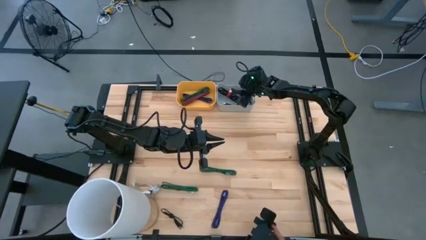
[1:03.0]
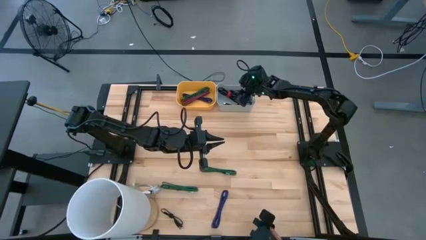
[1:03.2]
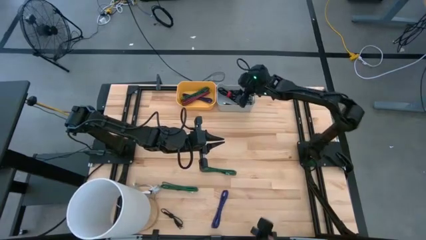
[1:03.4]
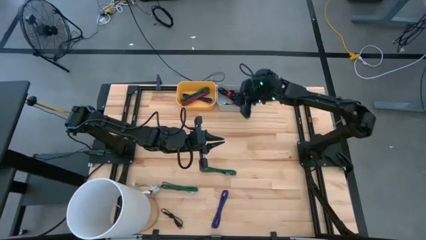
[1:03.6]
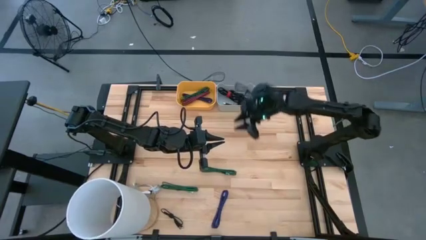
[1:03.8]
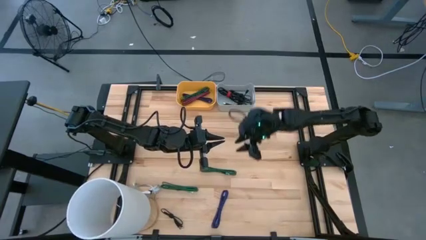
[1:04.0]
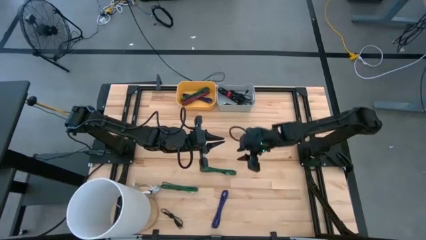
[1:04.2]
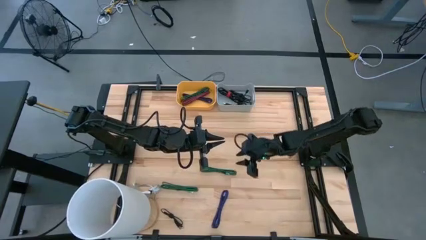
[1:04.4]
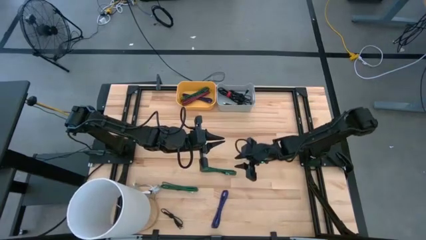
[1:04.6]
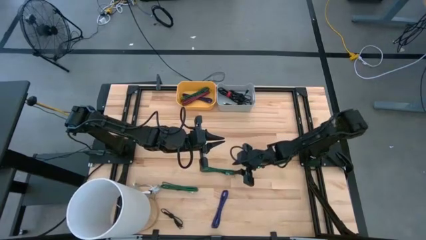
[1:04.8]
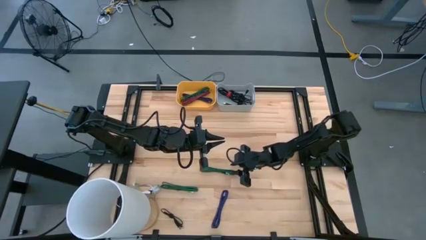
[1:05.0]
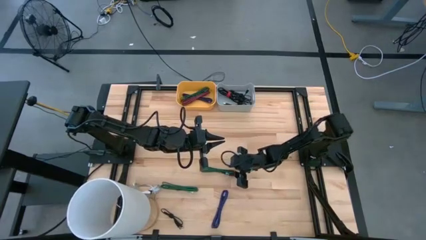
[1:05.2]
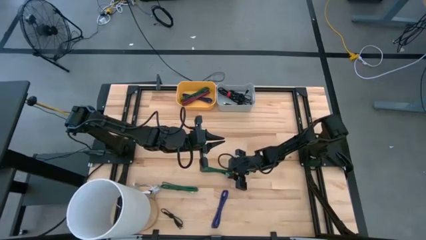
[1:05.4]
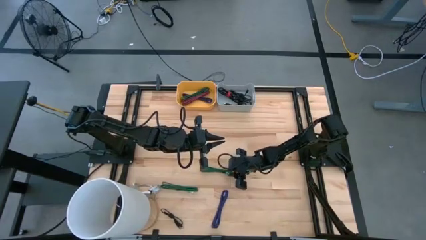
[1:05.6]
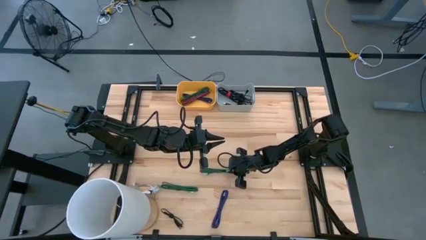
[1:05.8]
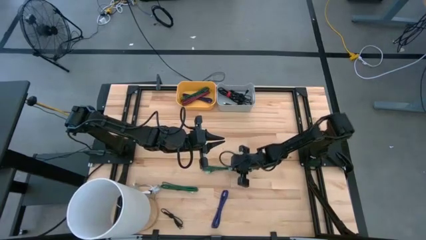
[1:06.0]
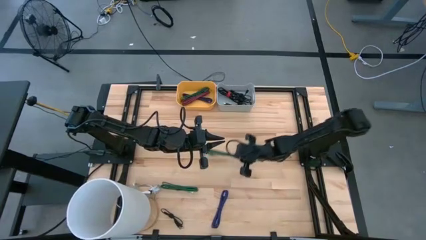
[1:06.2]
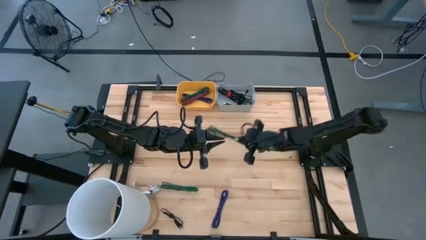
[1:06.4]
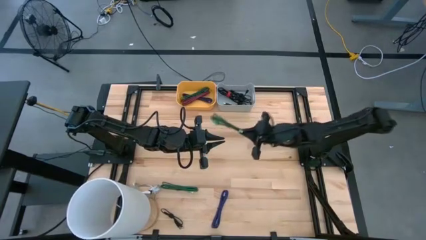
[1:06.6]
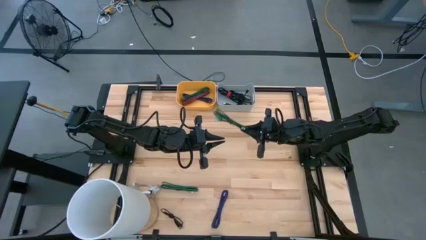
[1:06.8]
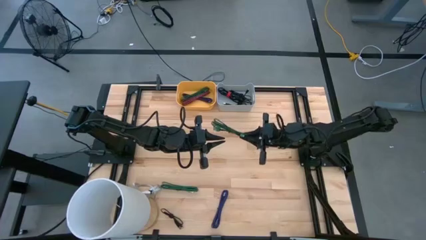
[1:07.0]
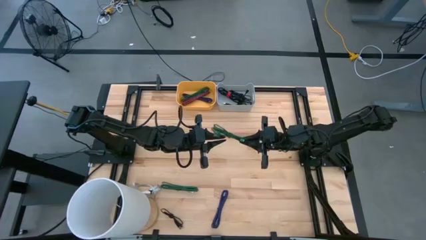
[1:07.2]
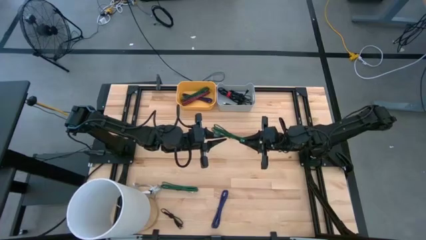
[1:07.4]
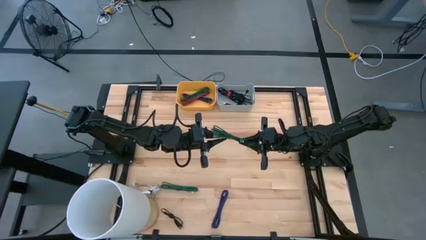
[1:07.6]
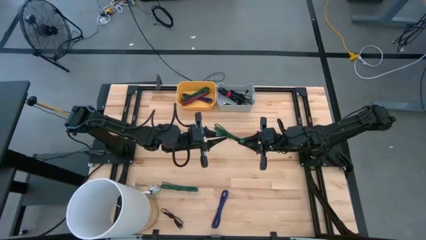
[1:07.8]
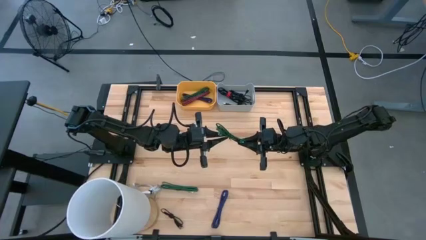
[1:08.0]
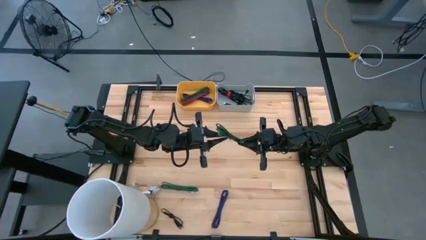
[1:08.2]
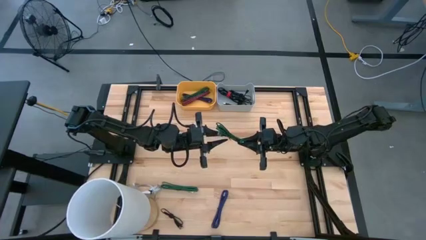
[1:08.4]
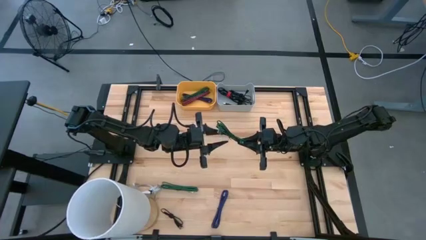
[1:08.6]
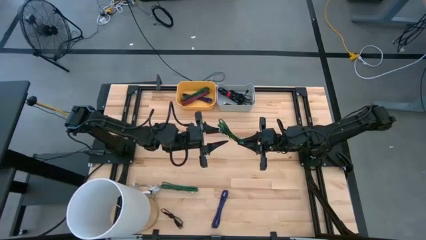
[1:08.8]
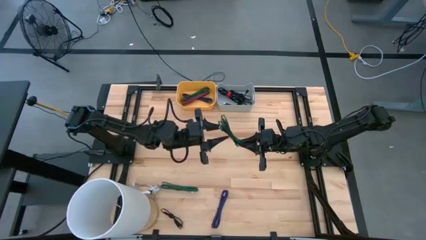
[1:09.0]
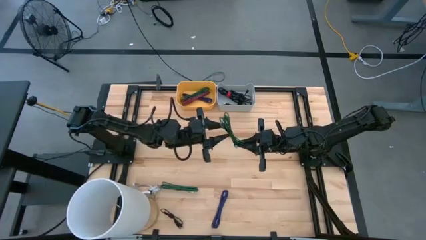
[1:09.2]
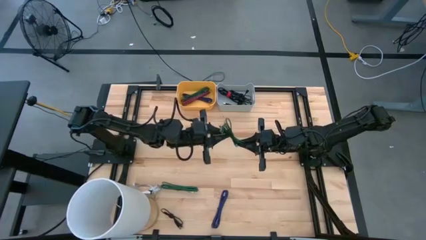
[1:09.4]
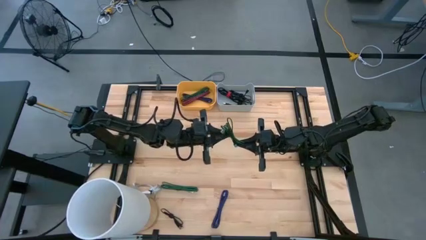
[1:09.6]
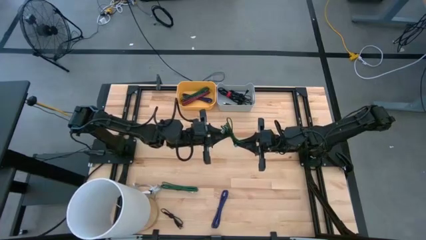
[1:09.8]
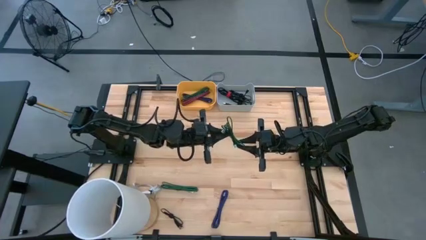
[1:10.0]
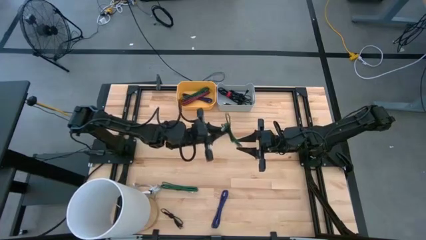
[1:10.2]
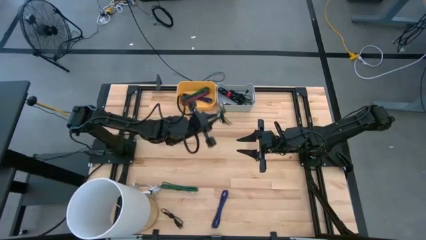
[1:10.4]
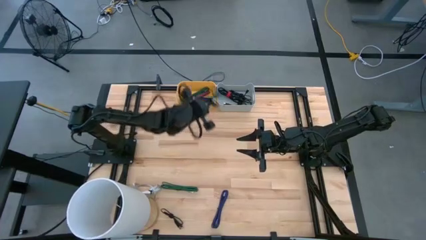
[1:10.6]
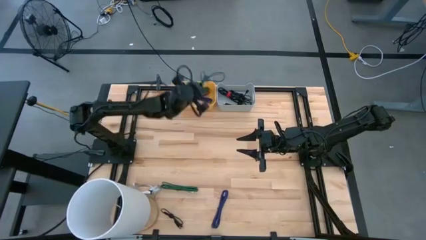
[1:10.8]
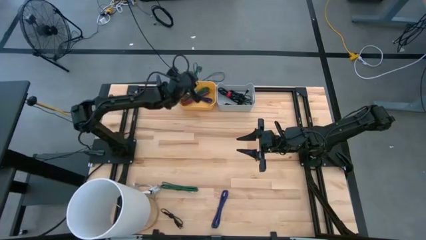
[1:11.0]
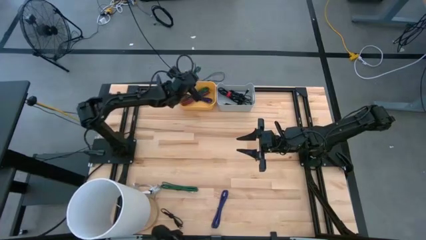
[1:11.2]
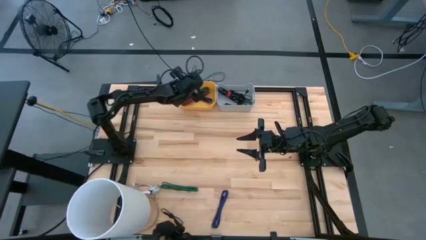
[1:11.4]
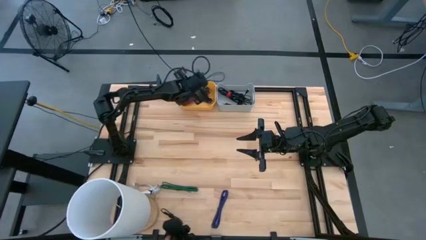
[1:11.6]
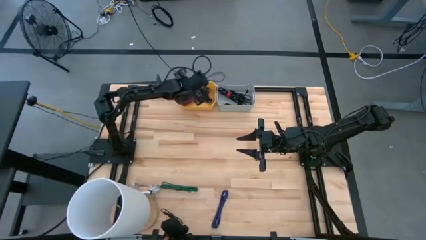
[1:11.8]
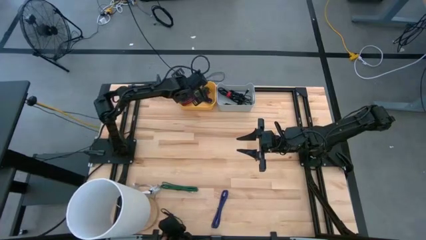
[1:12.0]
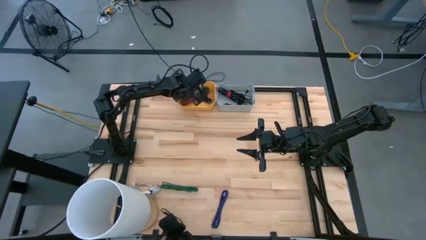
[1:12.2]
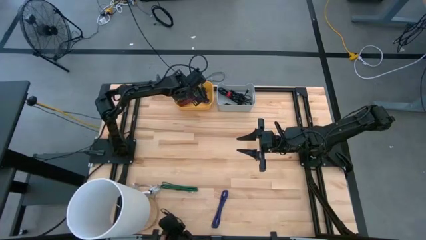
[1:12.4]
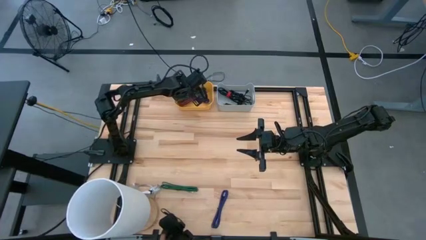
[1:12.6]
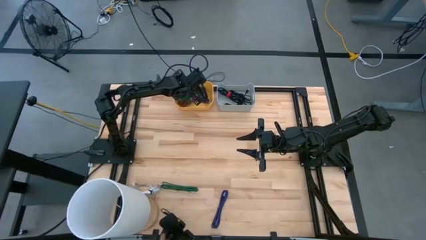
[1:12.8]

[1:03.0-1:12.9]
Task: Pick & Place USB Port
Put the green black charger cable into the yellow bin

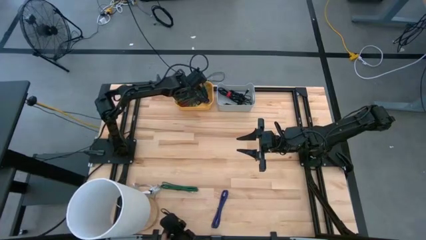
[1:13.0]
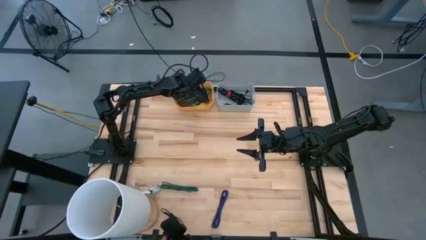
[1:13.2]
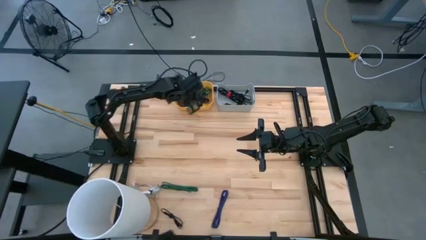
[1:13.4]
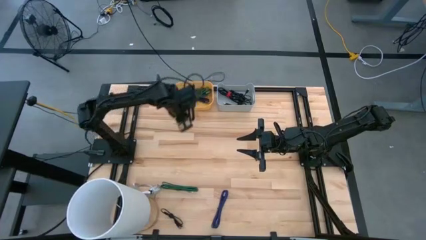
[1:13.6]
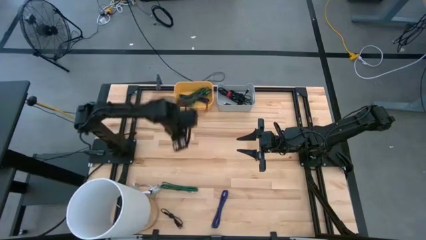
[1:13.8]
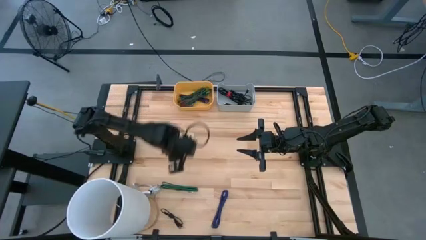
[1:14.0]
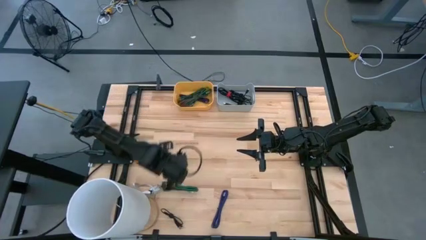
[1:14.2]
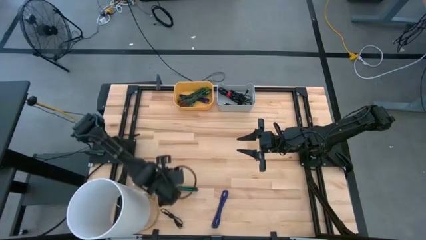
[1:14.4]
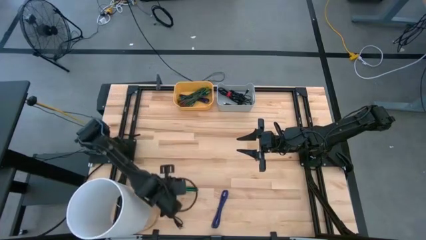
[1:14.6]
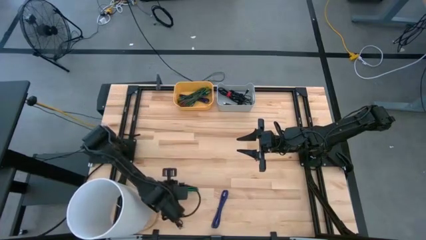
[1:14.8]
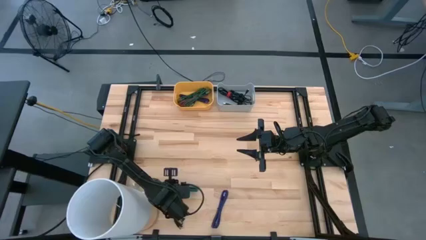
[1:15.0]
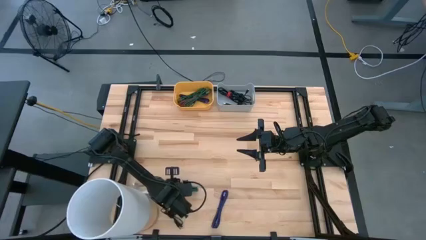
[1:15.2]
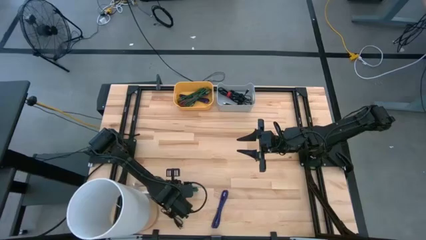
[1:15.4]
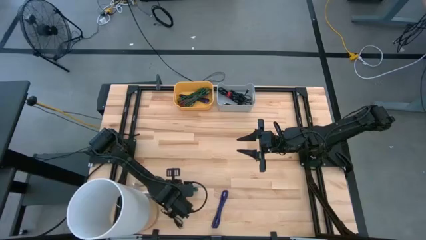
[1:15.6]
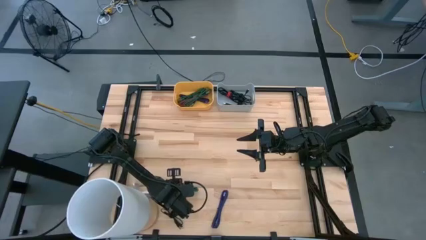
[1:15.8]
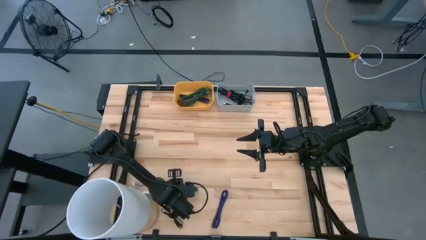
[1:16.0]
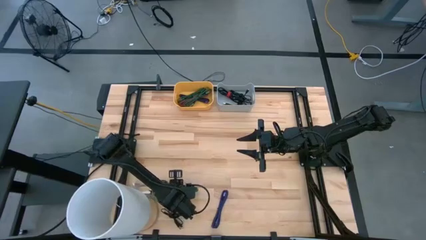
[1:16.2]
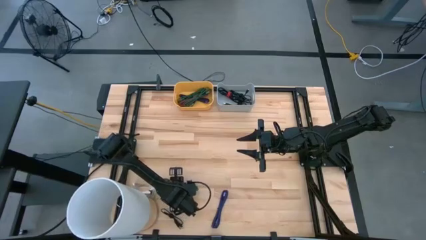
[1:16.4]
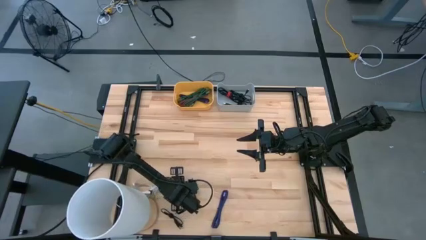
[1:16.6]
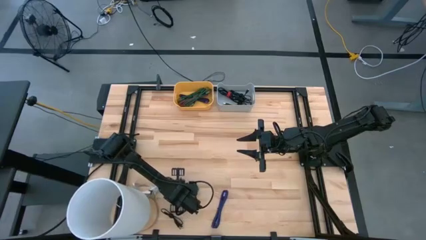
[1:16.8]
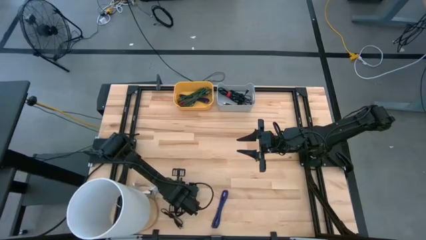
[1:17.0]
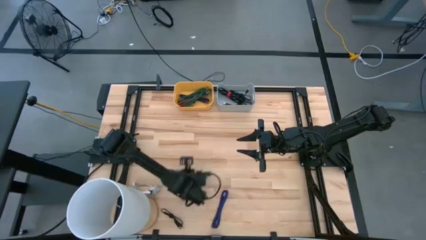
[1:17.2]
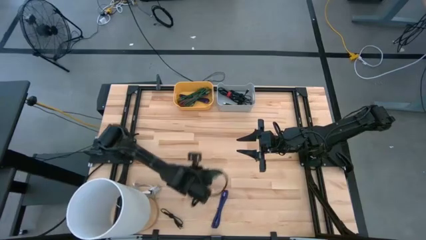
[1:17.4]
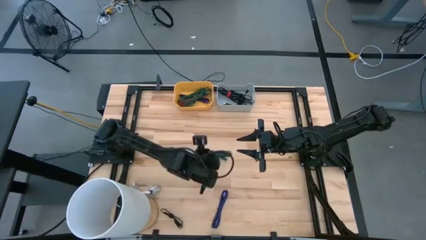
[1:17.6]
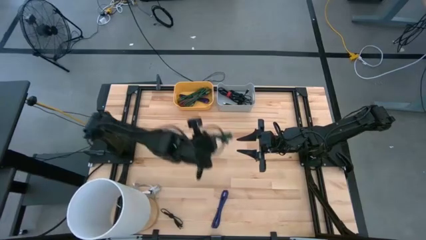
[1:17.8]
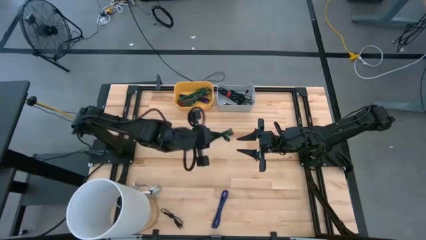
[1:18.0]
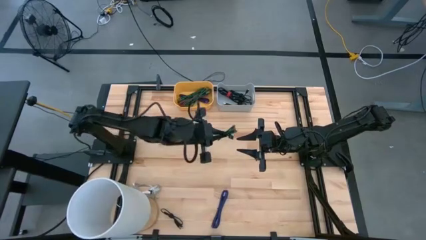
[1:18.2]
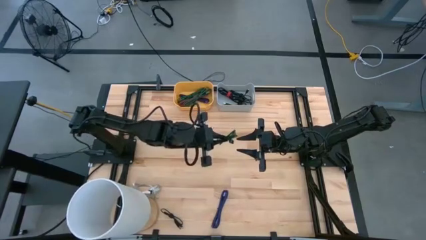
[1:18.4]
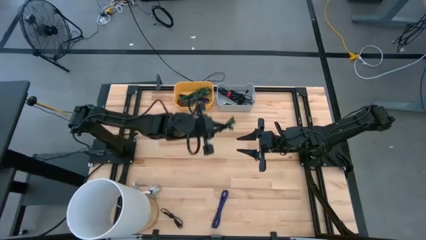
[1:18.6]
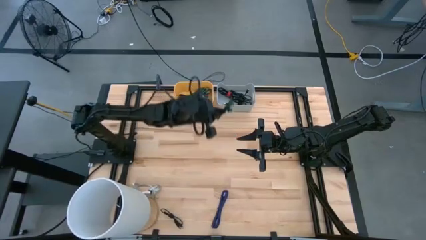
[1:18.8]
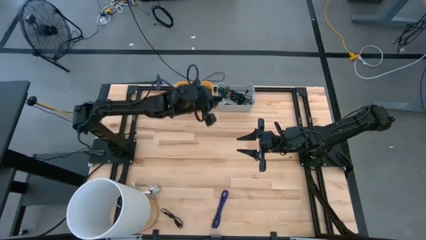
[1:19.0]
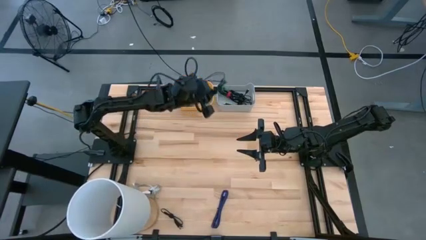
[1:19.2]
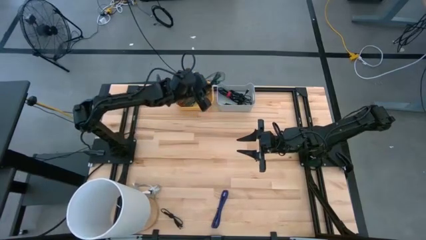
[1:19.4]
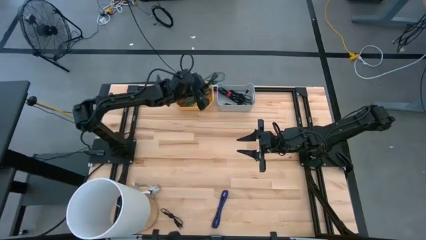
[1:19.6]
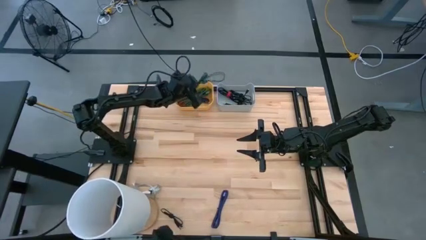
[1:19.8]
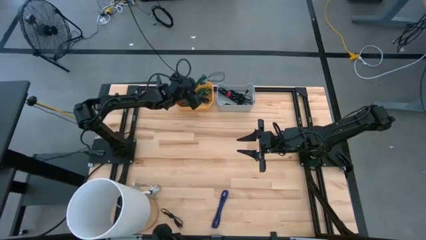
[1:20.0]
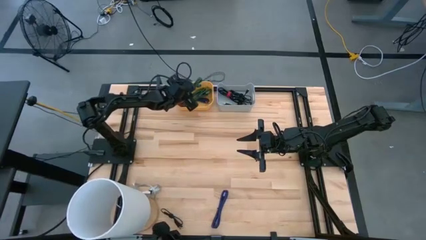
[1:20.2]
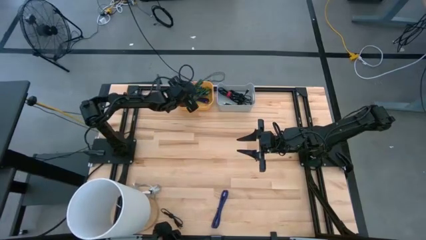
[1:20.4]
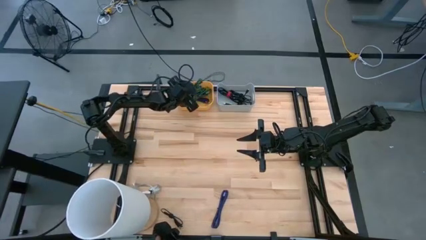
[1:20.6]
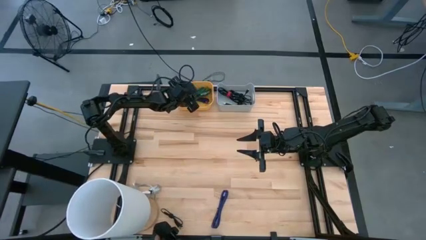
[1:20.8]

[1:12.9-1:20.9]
Put the green black charger cable into the yellow bin
